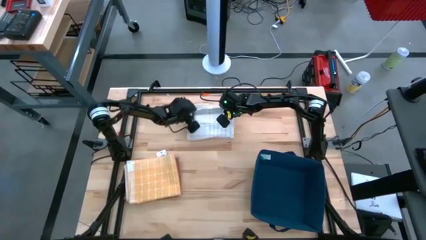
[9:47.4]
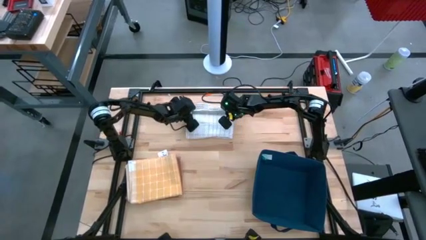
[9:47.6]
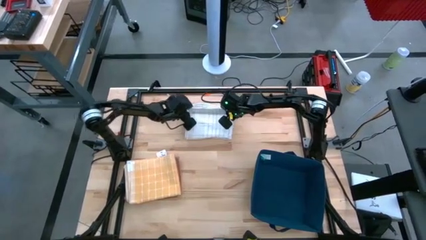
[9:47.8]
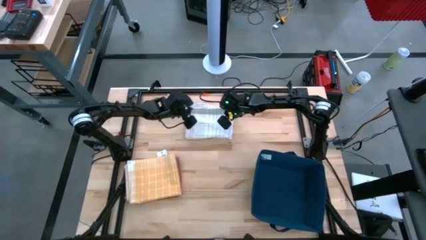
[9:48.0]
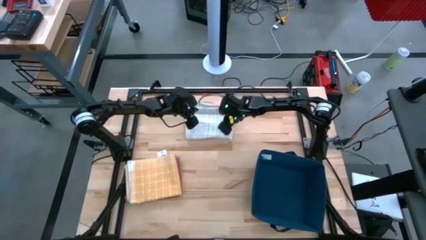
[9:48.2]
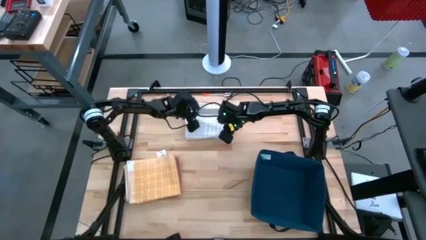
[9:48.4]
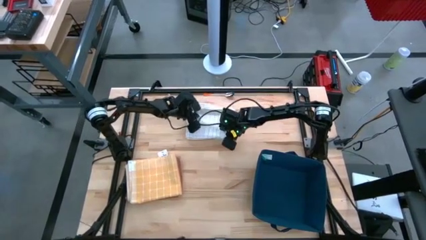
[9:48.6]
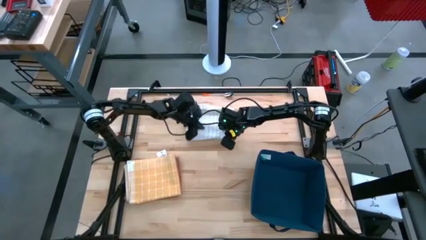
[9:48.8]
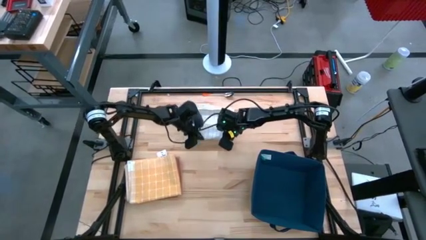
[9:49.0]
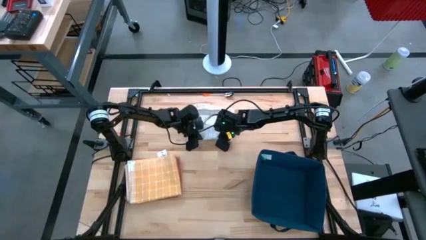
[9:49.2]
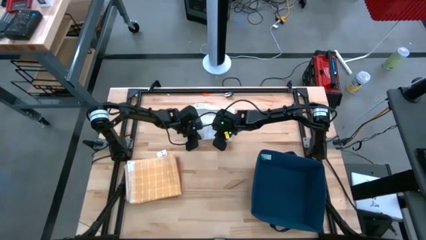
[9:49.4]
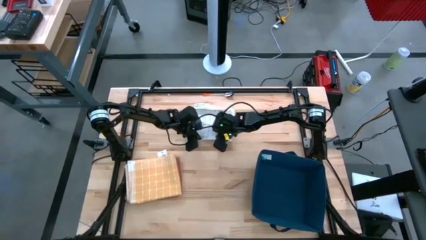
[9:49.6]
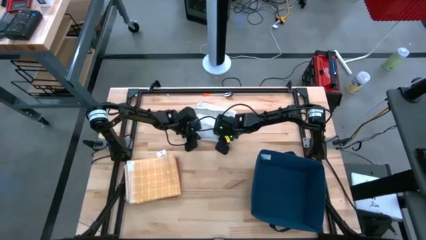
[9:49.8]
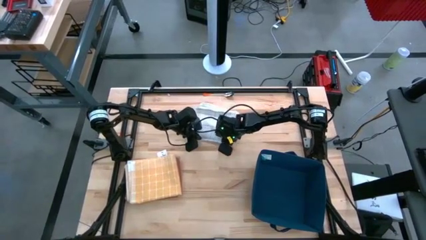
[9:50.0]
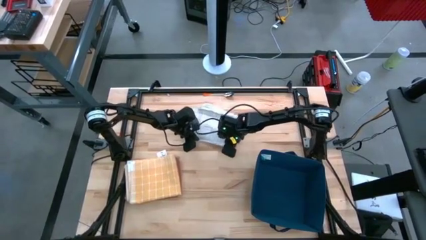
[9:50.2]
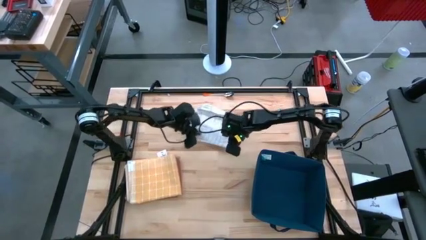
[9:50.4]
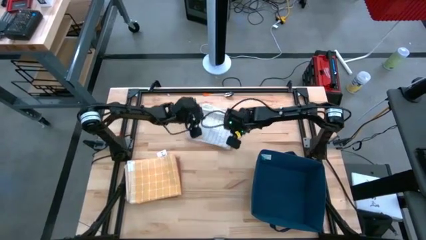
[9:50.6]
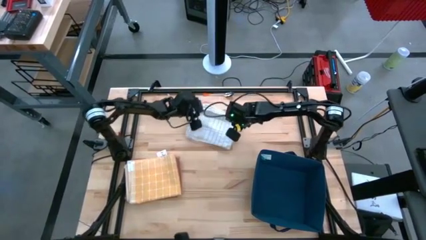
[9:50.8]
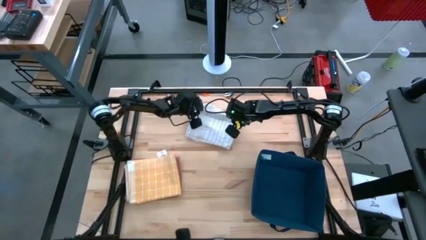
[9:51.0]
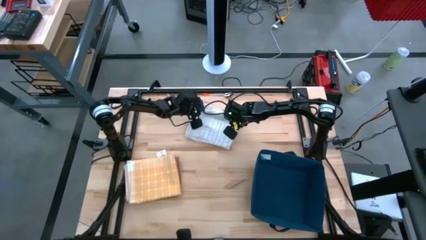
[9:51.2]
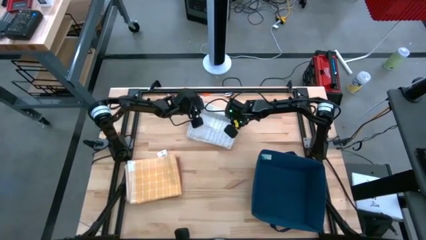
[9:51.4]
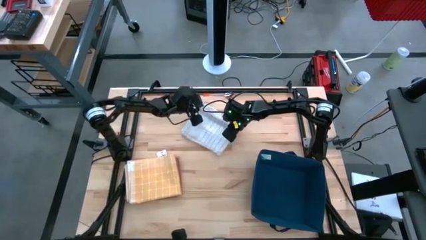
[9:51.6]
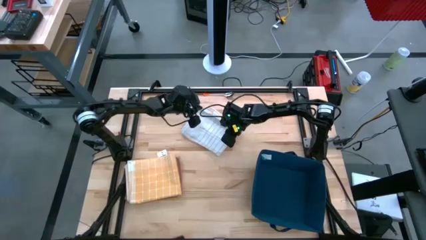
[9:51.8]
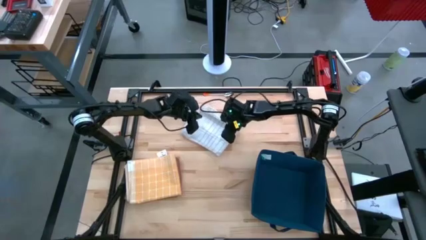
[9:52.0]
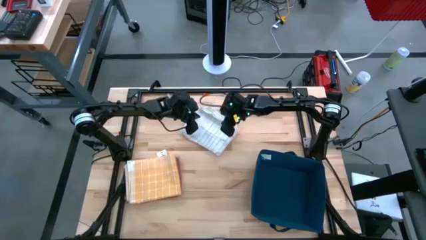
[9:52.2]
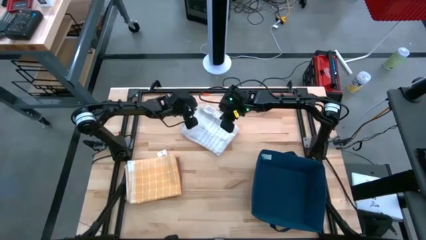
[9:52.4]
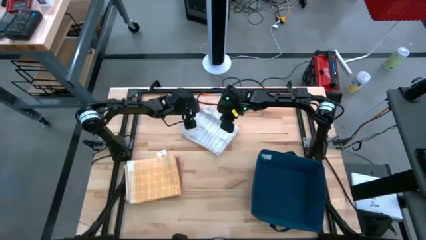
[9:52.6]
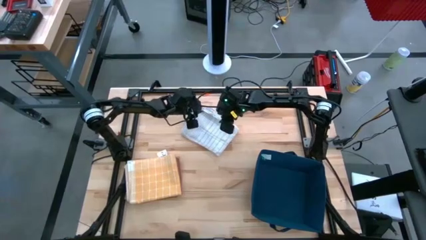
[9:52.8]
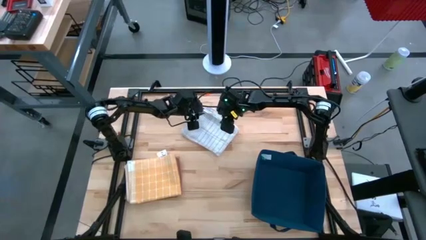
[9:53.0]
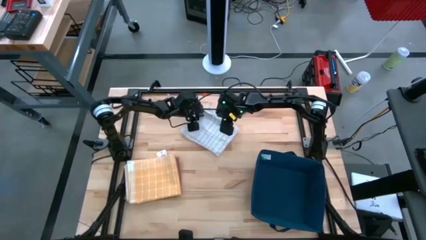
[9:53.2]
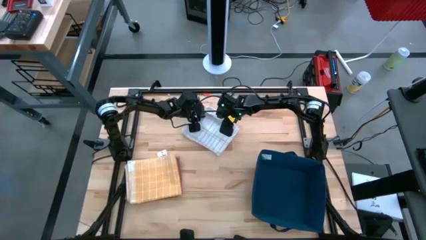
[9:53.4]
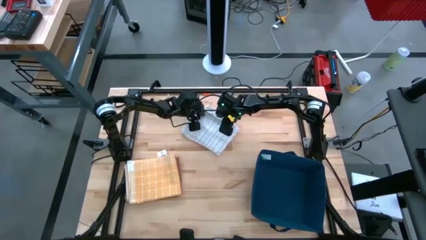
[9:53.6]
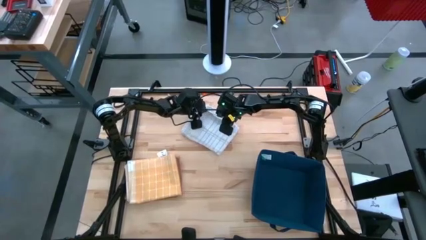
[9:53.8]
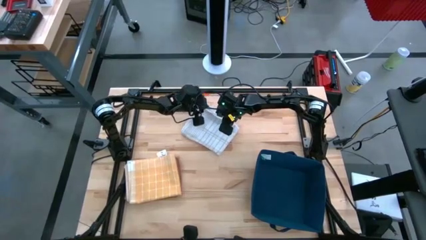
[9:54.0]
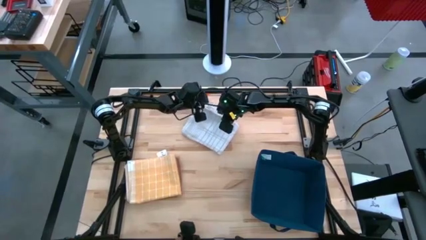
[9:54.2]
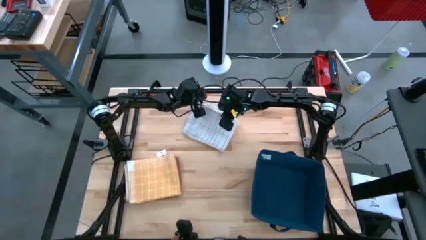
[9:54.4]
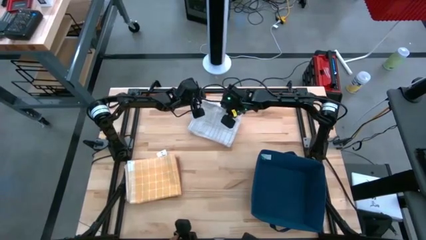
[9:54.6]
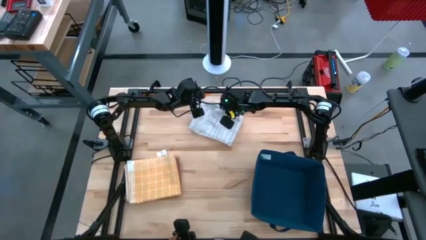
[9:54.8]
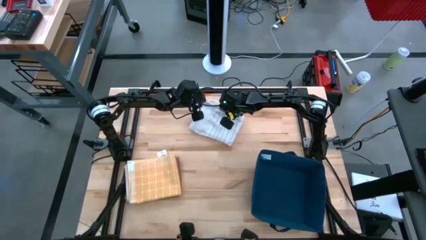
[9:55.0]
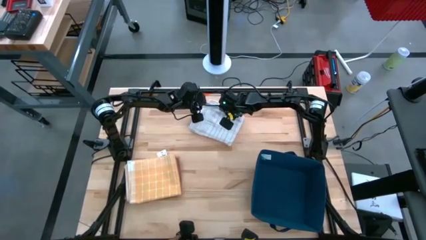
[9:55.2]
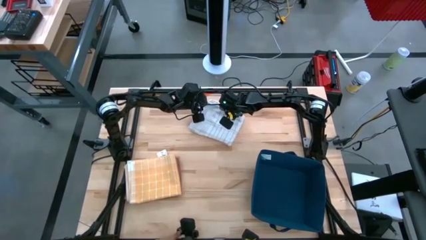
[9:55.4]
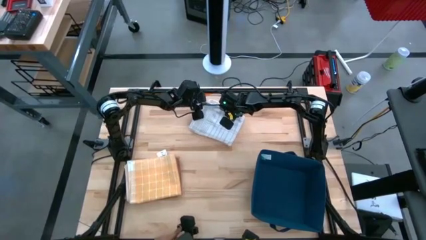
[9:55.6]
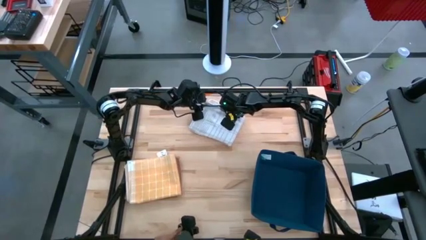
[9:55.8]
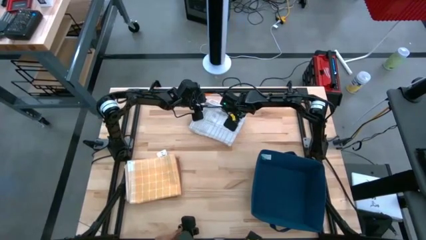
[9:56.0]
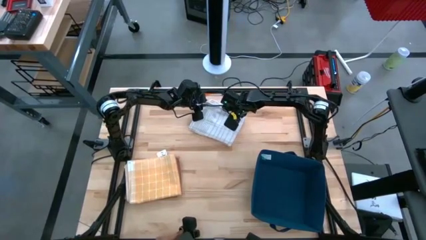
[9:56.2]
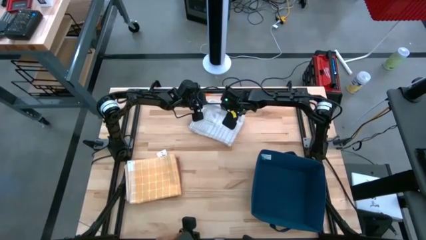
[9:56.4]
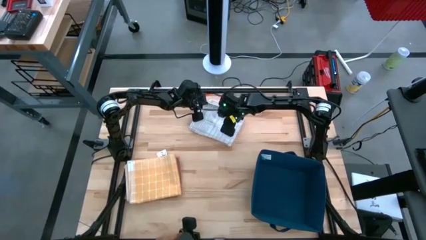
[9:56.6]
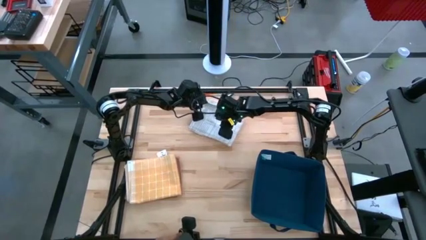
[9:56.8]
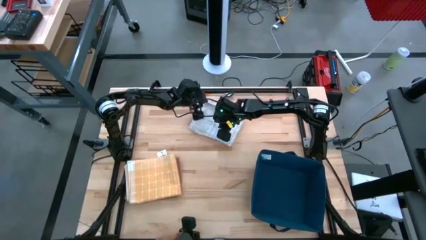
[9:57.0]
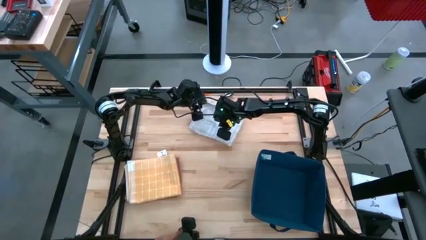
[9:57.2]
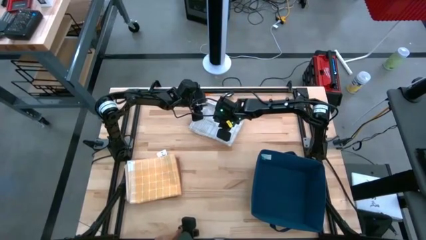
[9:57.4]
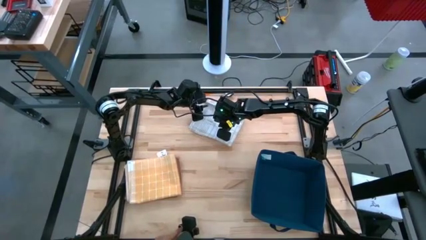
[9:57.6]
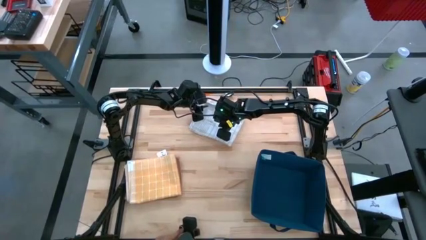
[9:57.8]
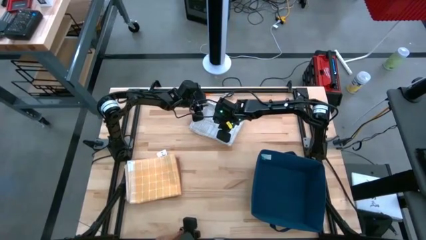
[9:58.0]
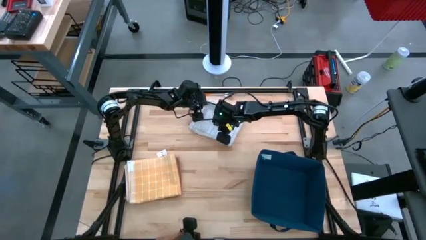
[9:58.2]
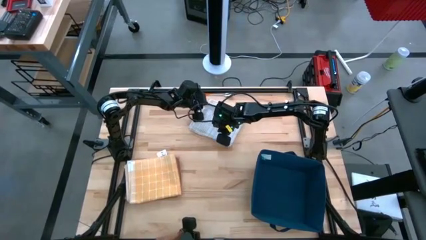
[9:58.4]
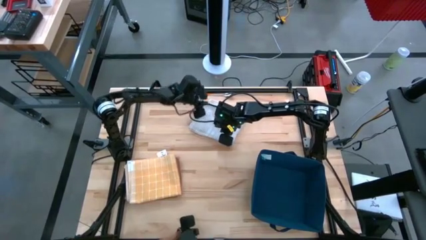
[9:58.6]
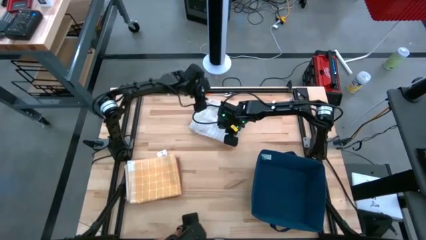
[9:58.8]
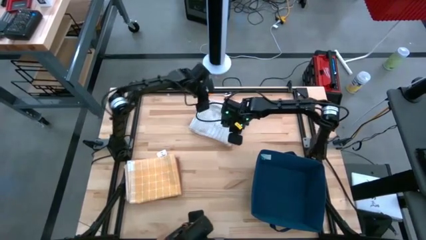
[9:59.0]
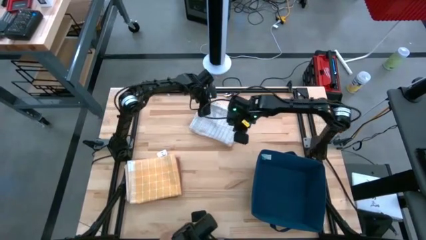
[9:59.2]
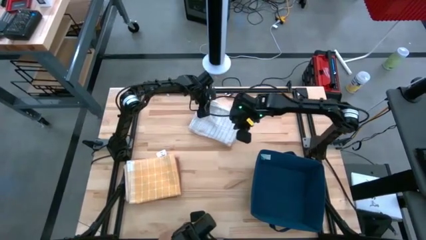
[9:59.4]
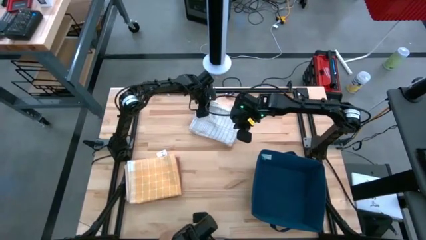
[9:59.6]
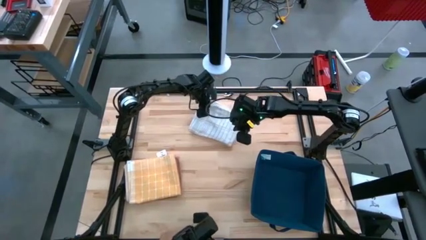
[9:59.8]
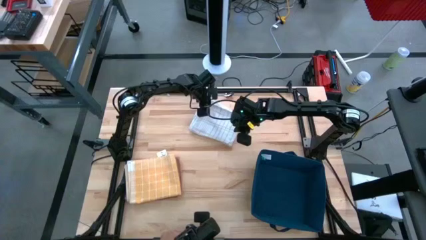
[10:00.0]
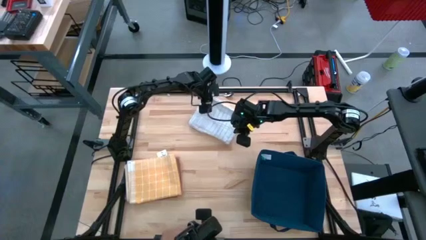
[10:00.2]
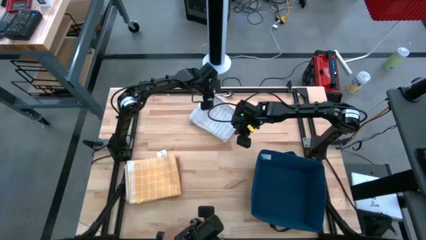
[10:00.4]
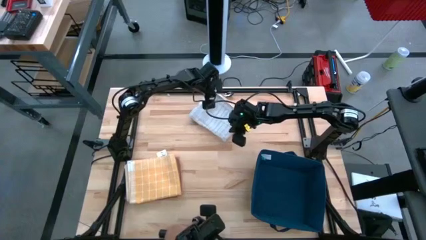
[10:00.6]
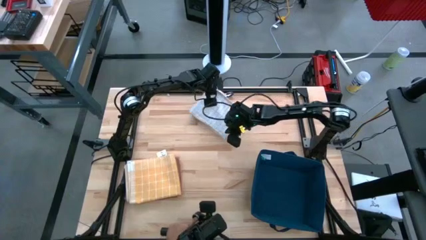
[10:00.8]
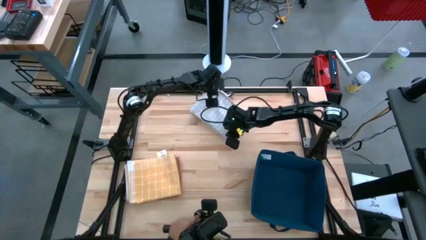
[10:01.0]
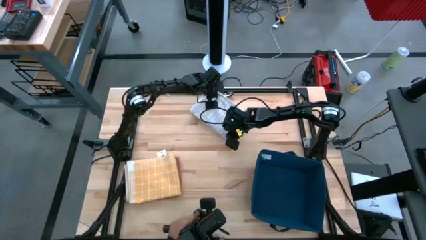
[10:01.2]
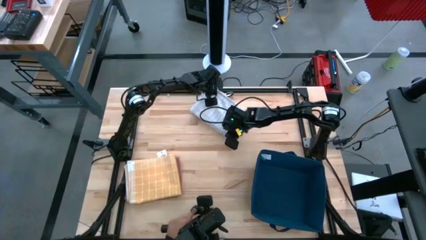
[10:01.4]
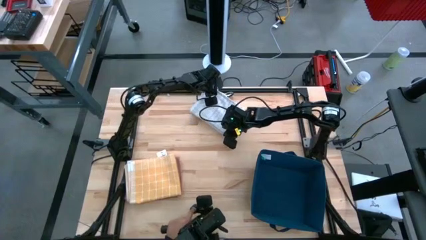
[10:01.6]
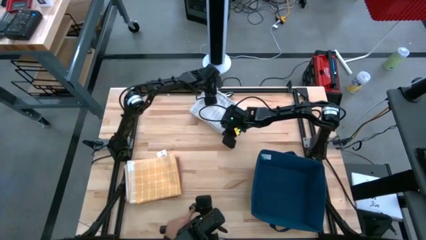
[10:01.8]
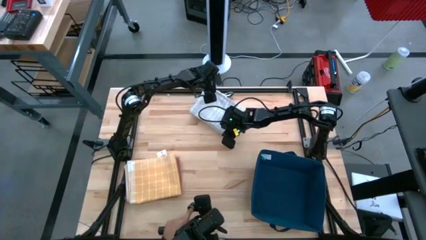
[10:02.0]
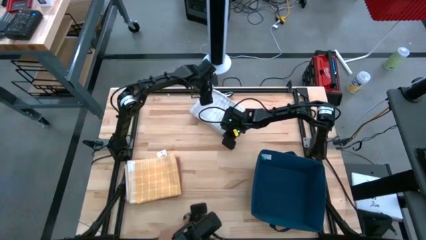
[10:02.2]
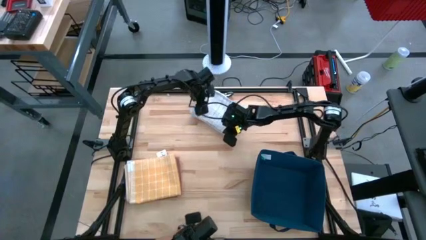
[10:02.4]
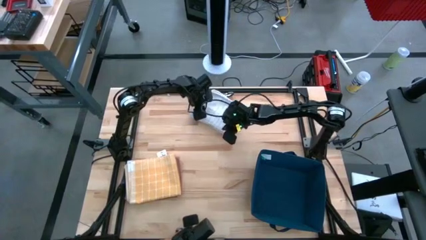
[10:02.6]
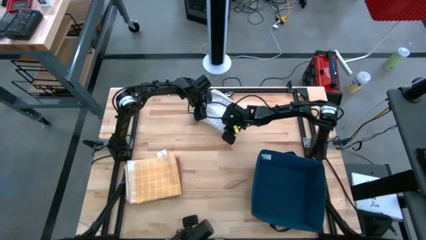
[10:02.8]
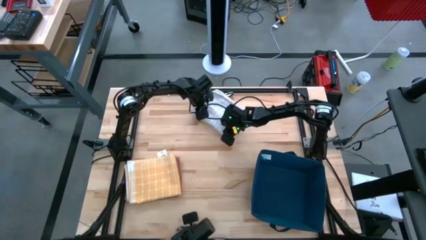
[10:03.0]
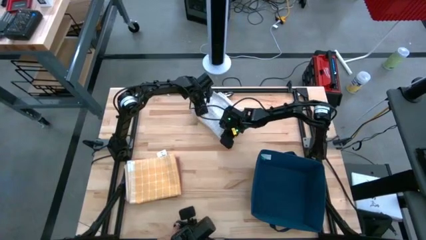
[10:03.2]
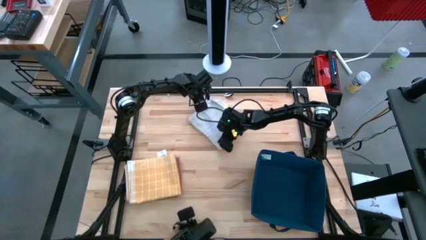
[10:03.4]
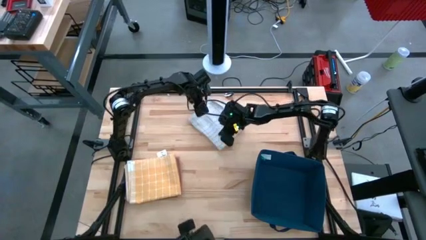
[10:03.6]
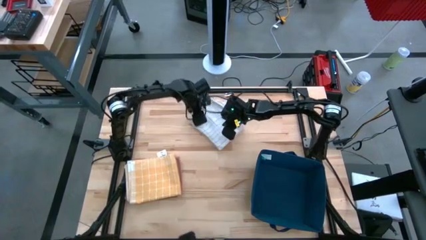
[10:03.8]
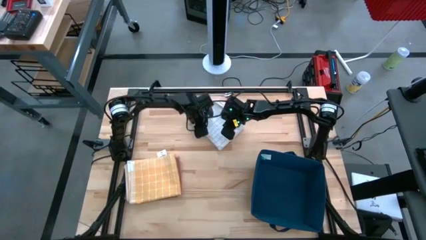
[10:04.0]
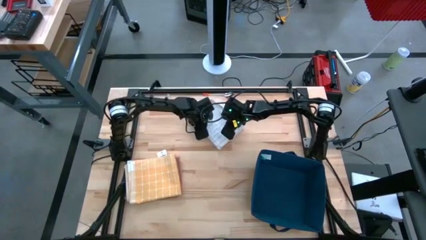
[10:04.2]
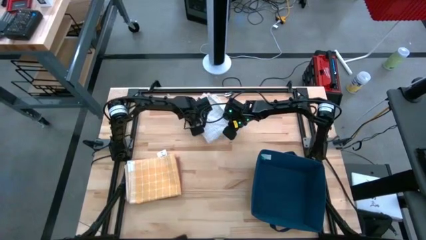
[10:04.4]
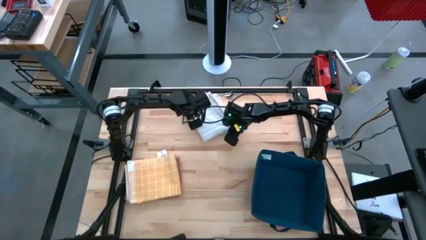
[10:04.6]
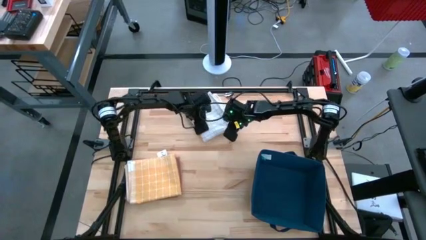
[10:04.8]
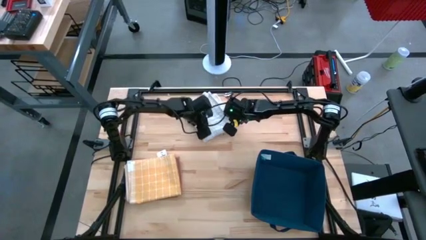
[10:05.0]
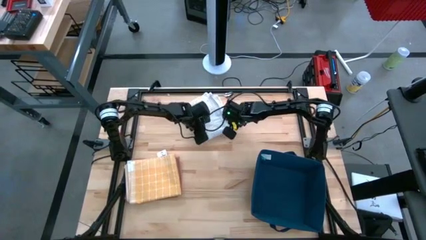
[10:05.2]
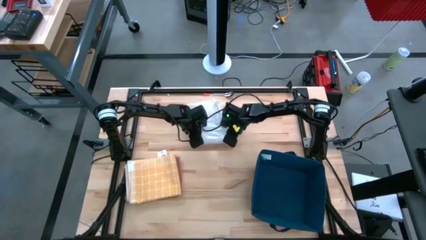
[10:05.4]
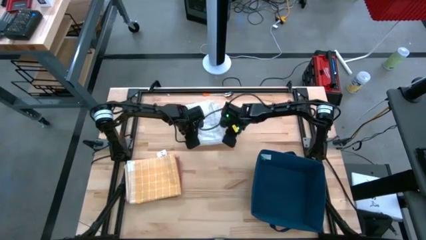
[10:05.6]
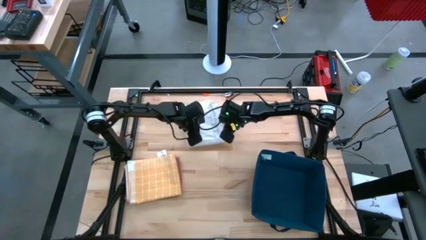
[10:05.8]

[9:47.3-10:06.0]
Task: Fold towel
Fold the white towel
